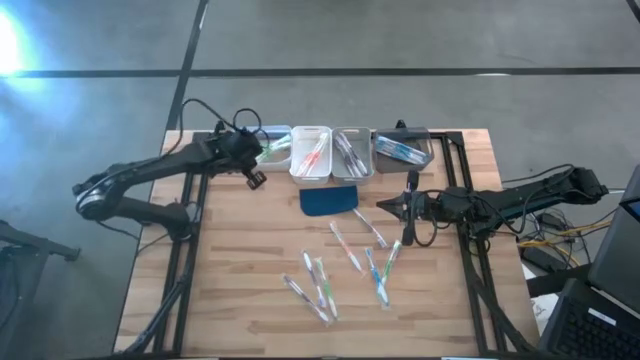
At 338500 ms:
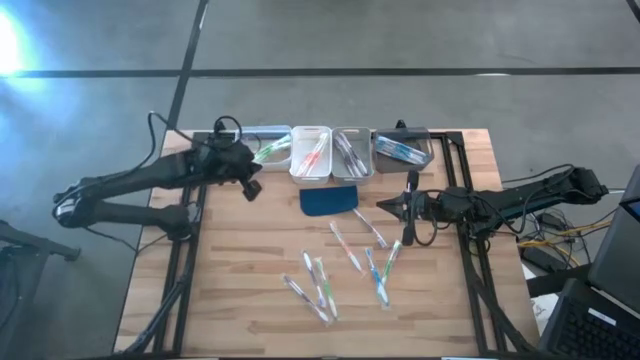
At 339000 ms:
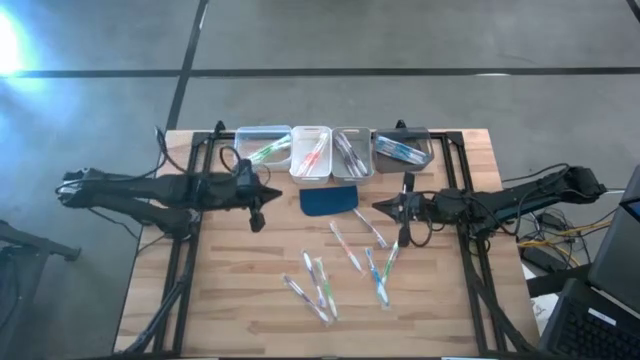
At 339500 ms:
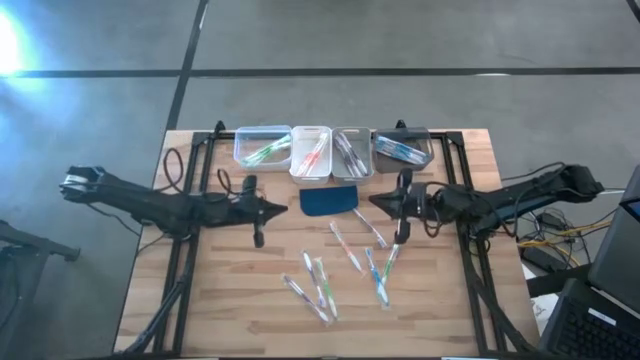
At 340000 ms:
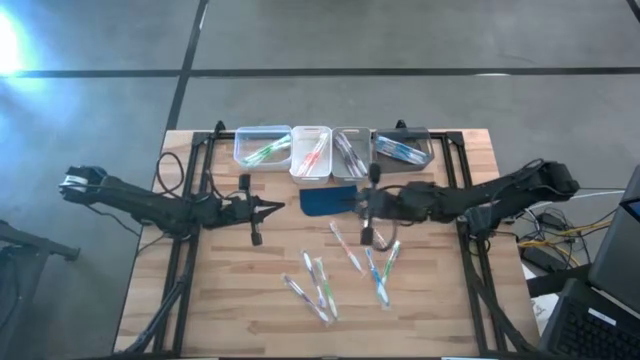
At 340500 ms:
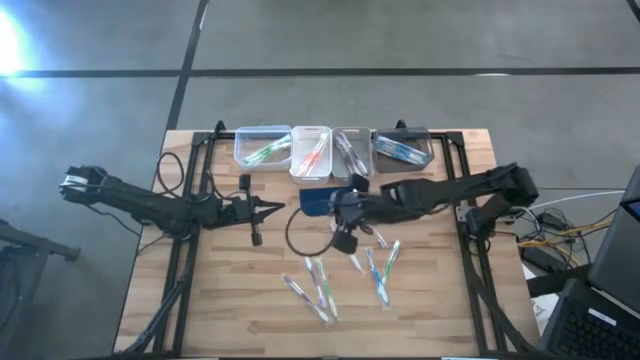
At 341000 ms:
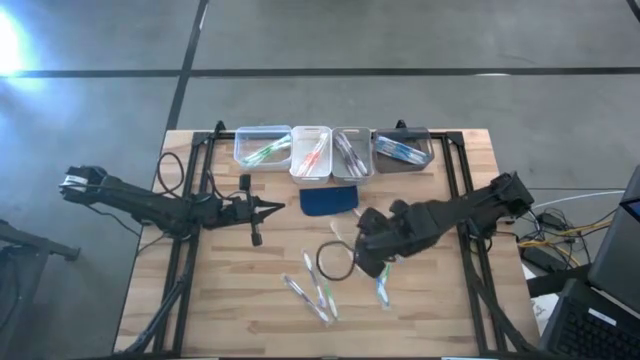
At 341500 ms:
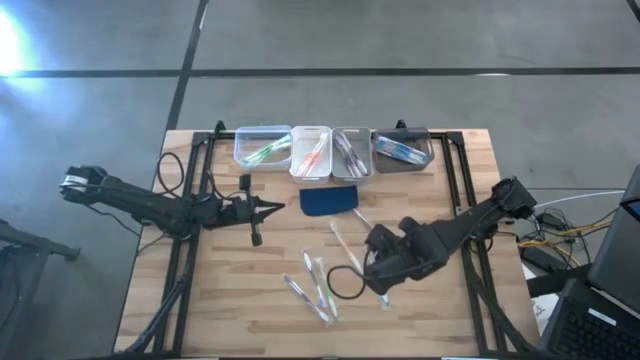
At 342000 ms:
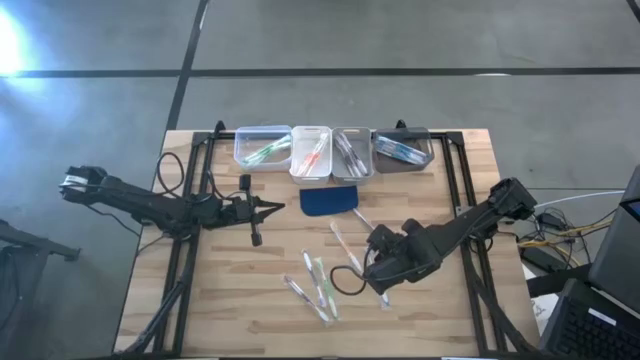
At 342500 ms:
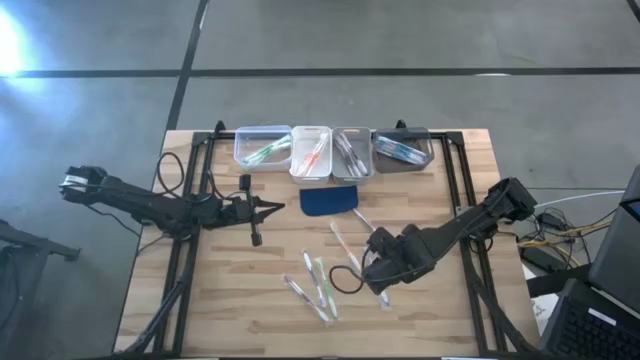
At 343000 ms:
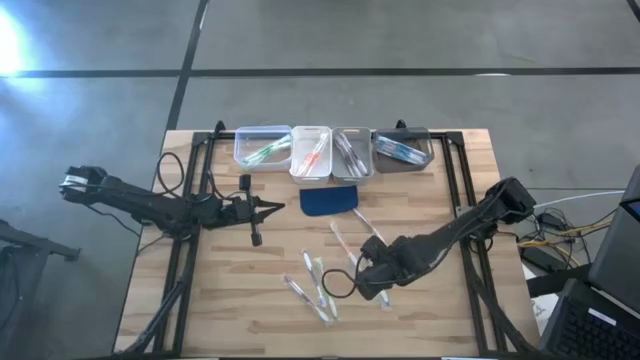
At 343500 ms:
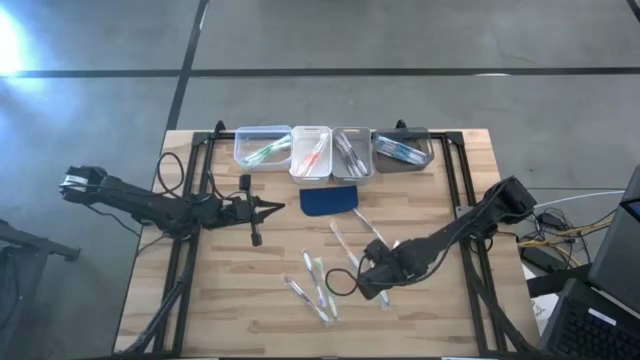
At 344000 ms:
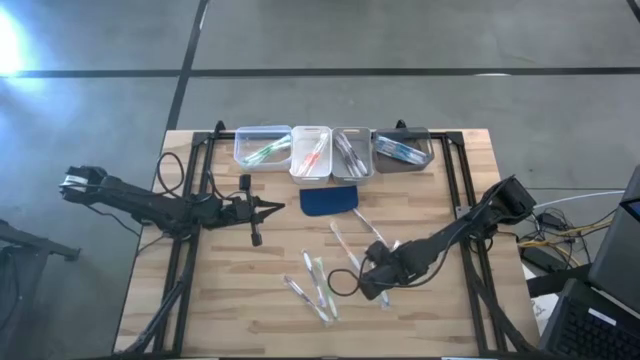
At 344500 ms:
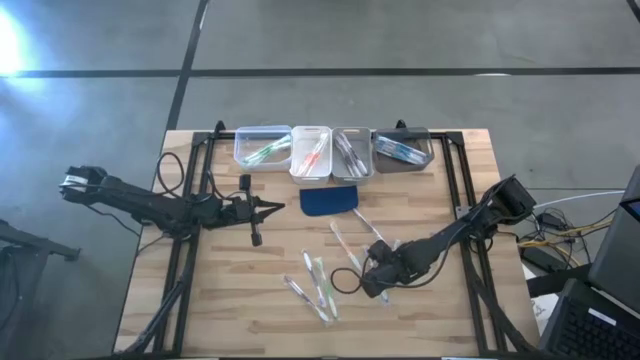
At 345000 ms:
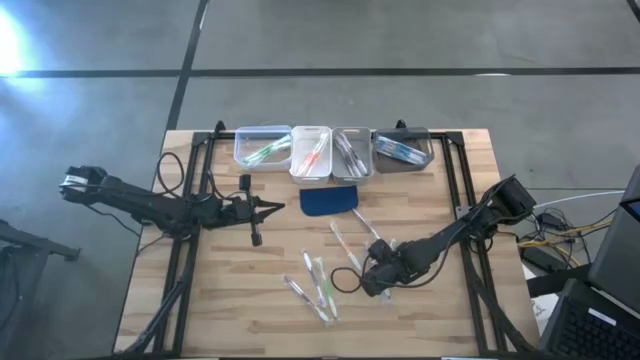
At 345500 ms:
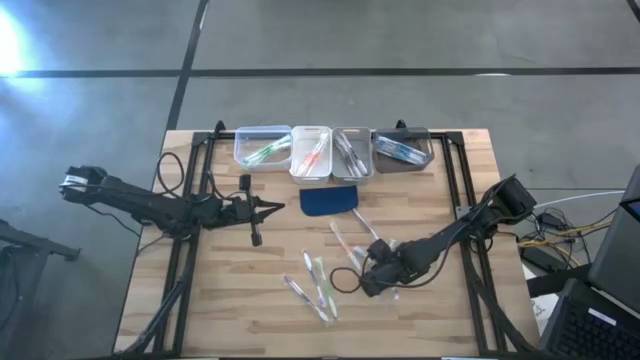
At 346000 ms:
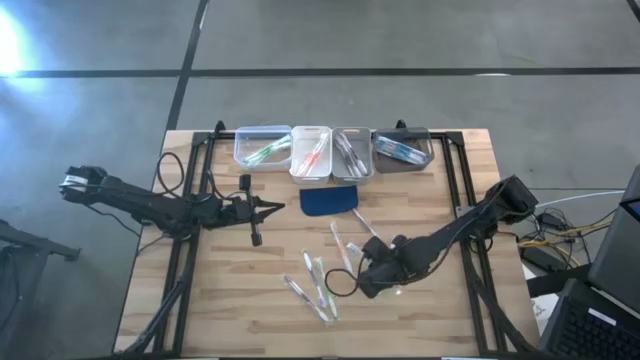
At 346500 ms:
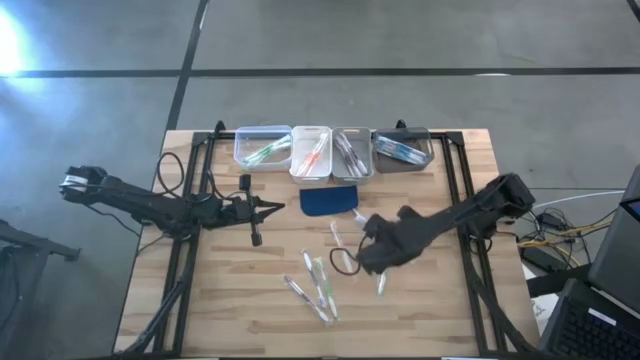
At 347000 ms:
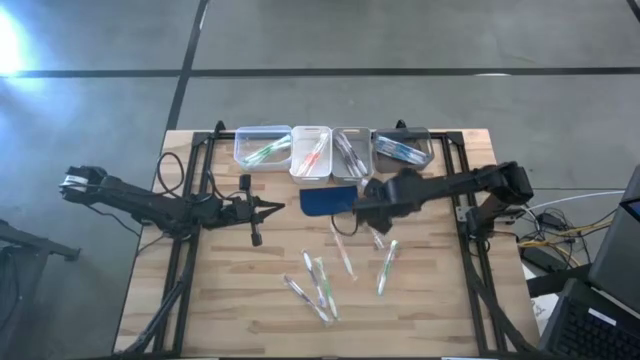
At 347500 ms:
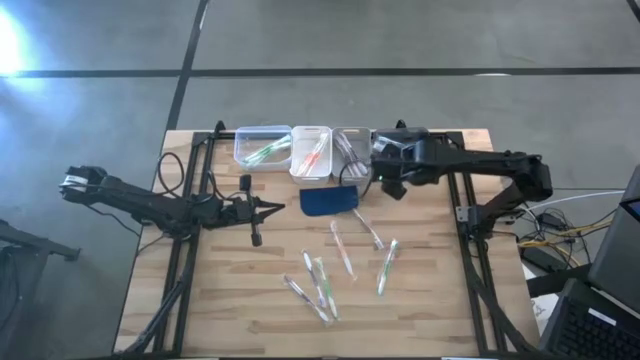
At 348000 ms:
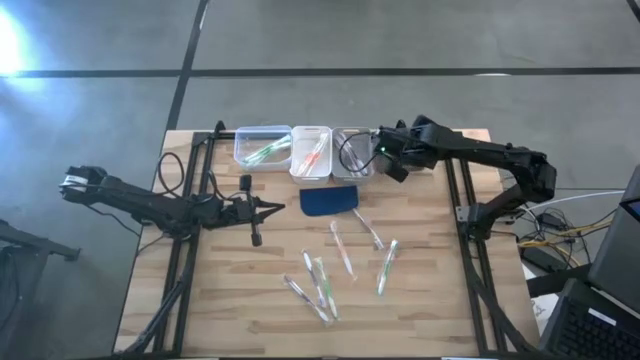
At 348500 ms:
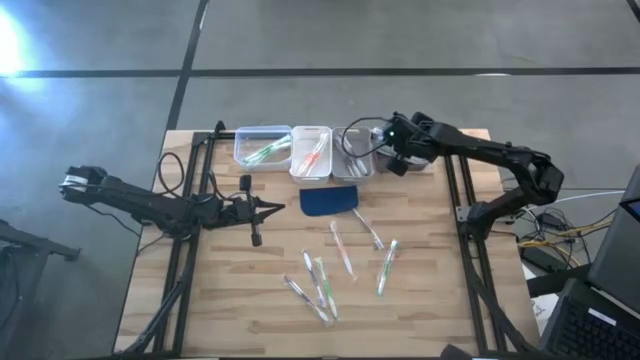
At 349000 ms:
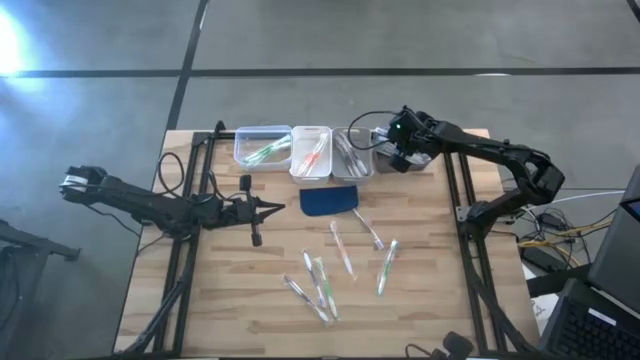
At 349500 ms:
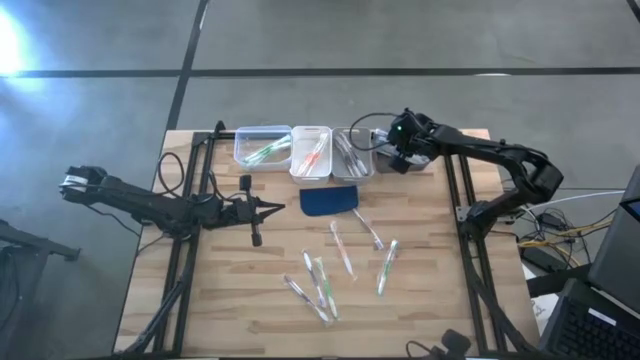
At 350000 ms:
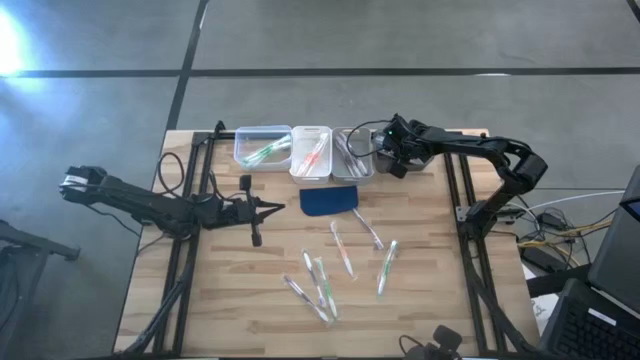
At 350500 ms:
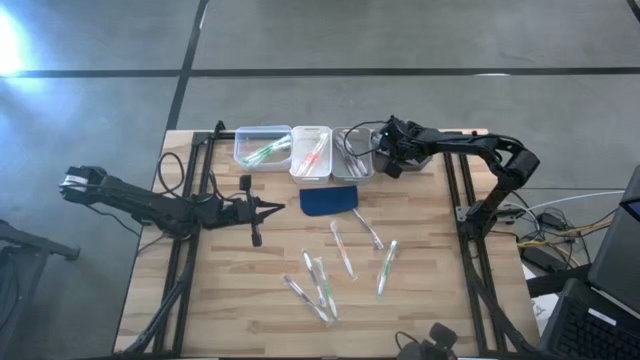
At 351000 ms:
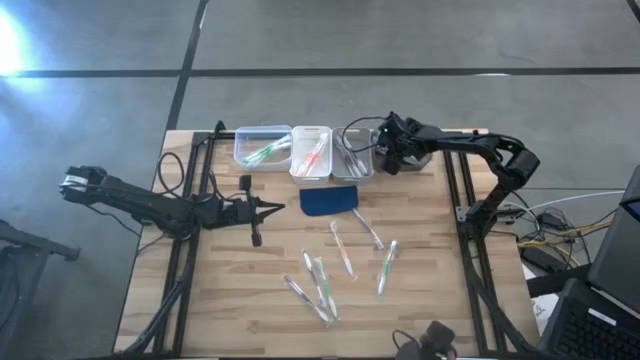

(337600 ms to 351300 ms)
Task: Pick & Place Toothbrushes
Put the blue toothbrush into the transparent black bin

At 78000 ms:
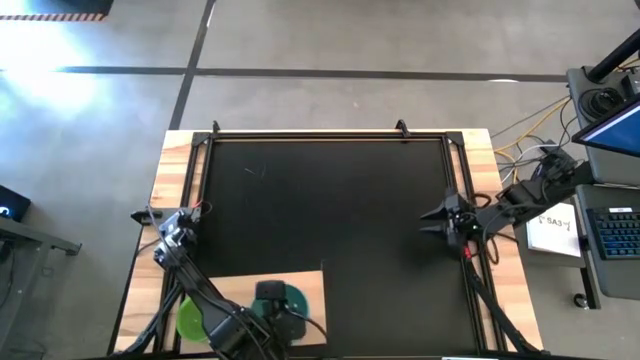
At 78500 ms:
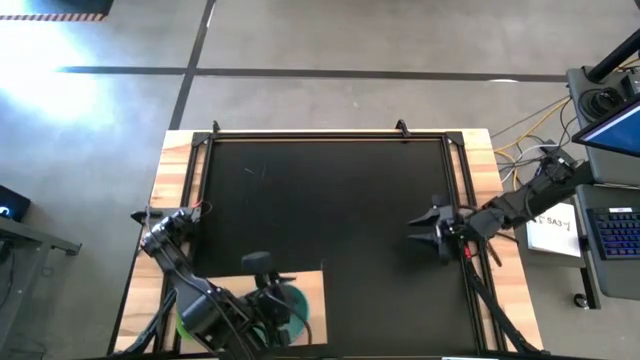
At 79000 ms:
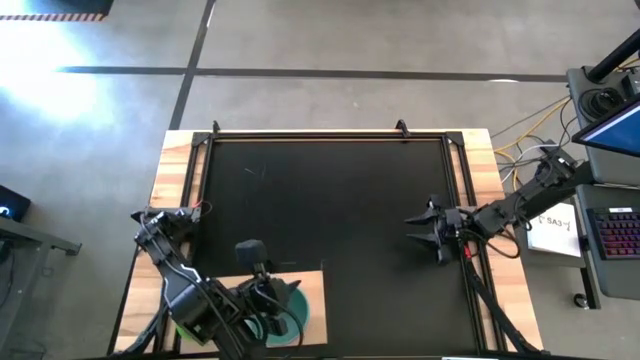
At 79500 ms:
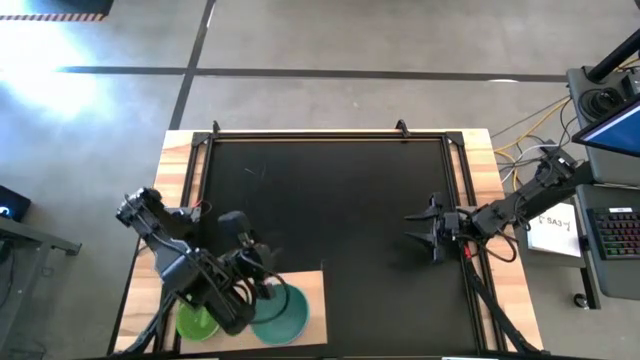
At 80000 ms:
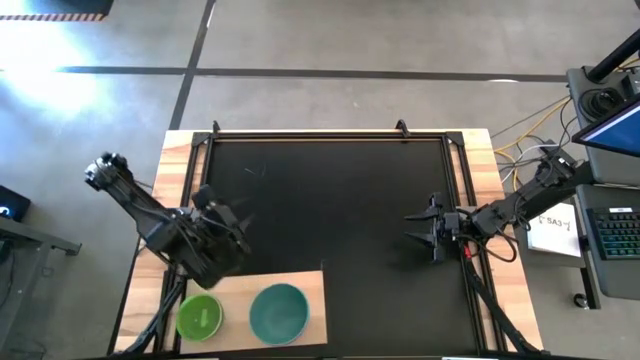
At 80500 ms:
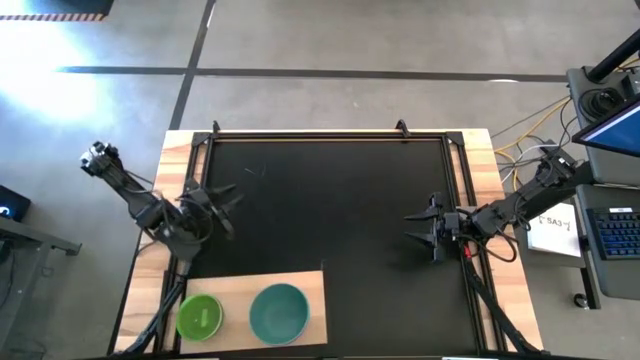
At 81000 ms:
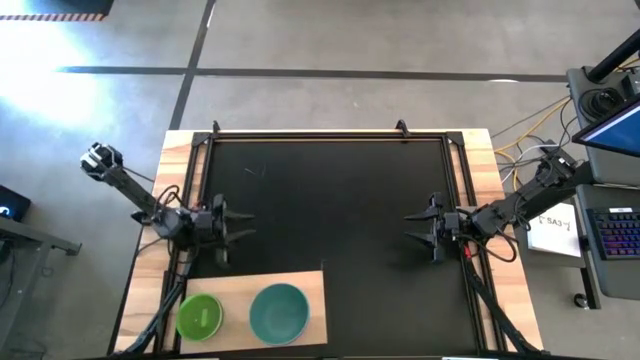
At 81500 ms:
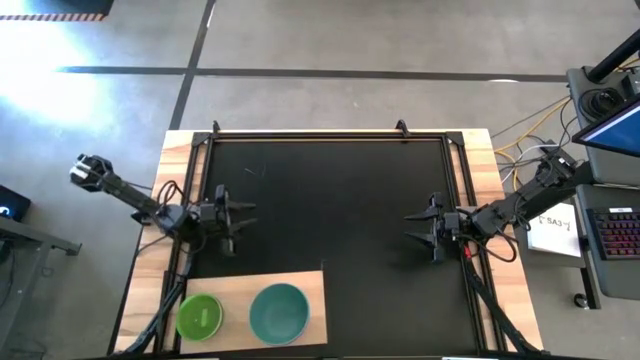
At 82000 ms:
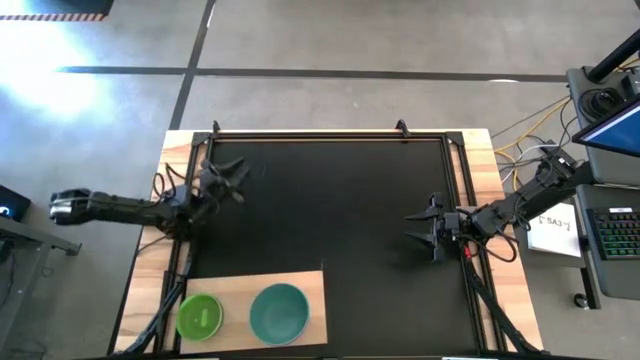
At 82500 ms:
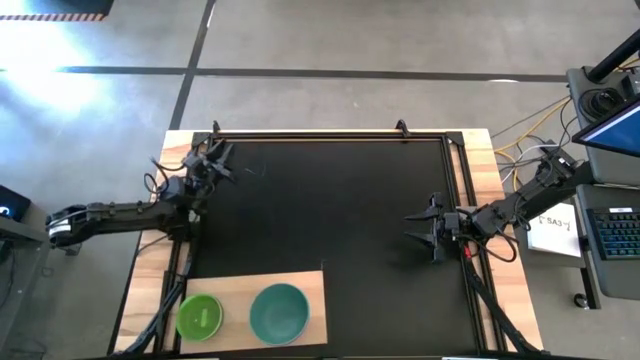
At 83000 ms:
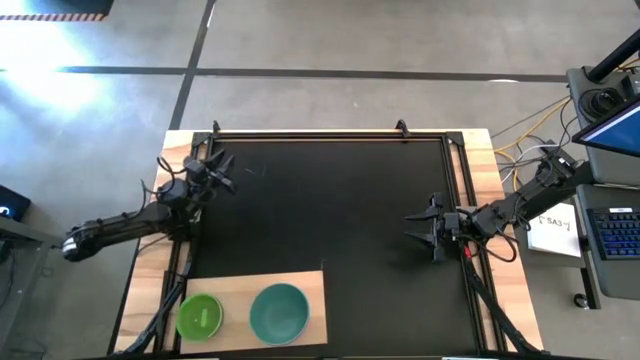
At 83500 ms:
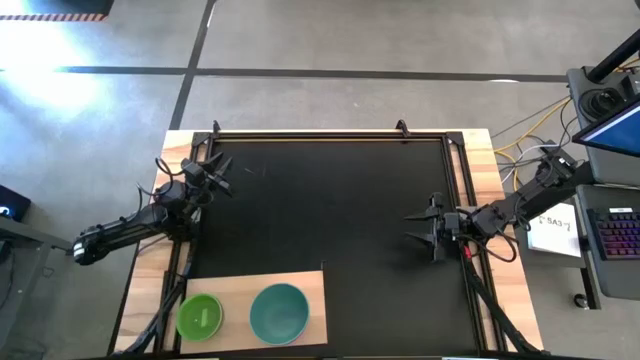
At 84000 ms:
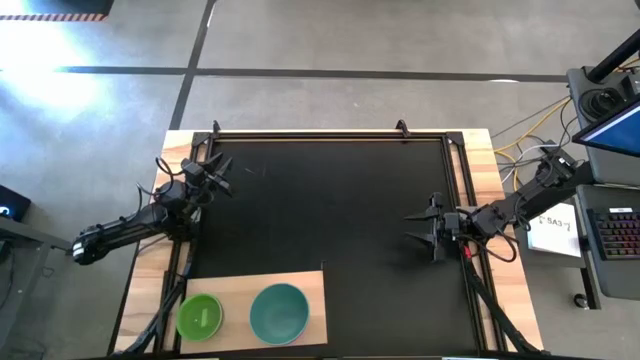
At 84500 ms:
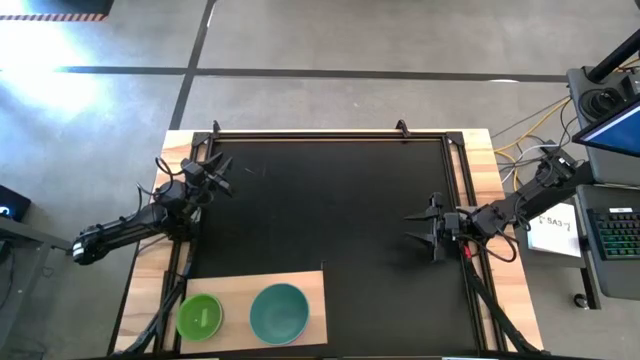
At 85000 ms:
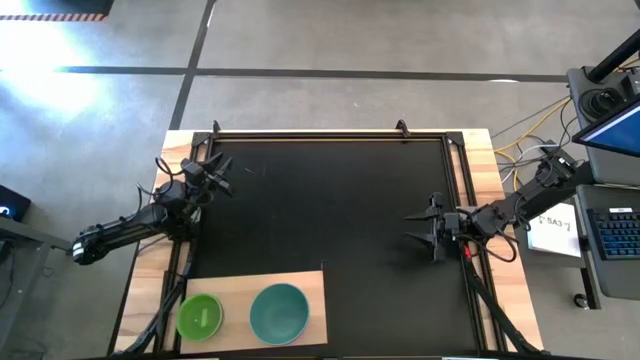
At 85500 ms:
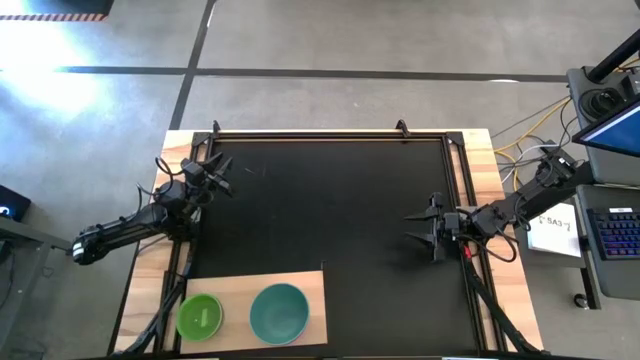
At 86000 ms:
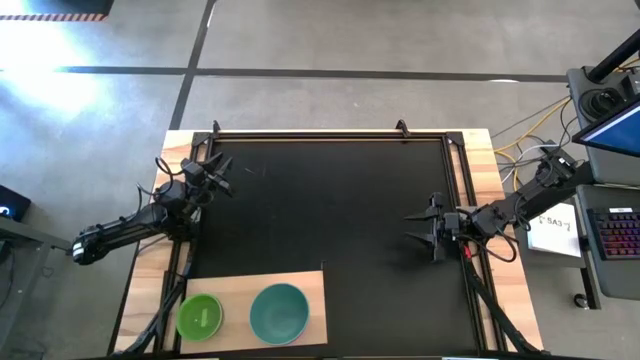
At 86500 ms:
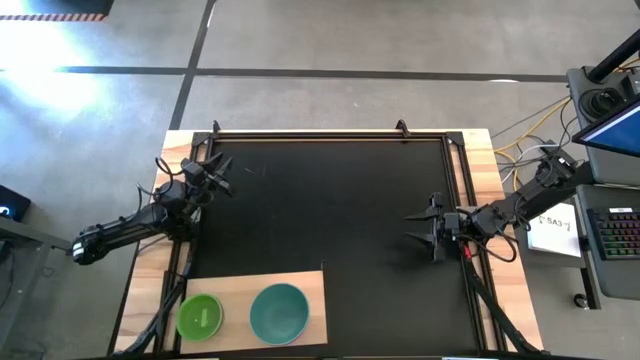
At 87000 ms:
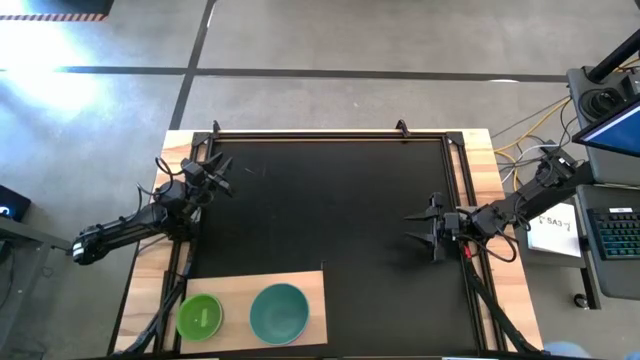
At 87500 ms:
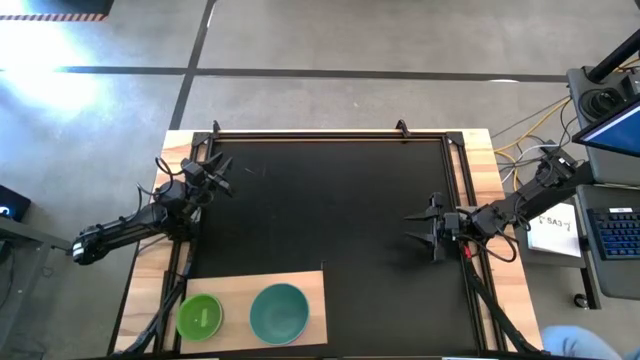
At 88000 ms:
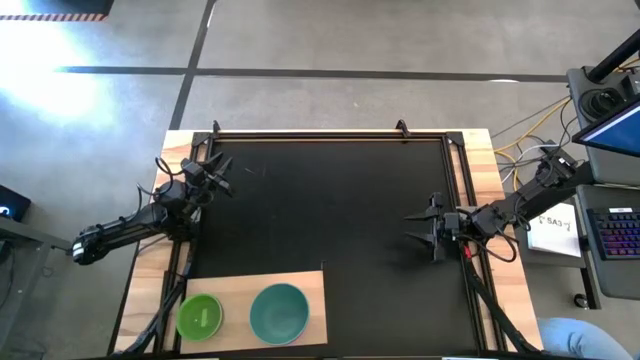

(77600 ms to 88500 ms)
Task: Place and stack bowls onto a shelf
Return to Home Position
